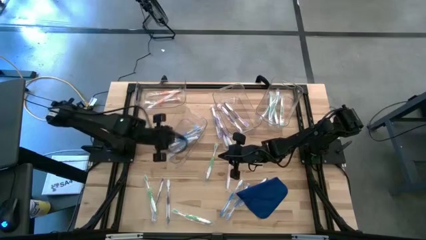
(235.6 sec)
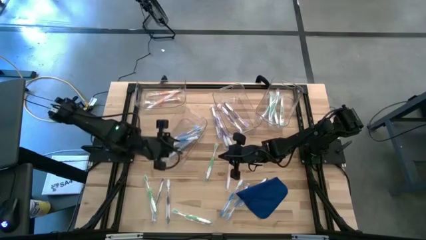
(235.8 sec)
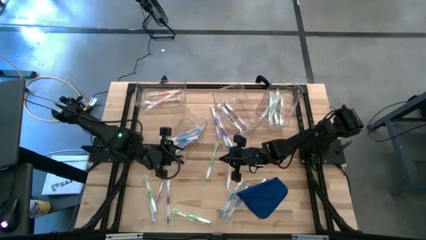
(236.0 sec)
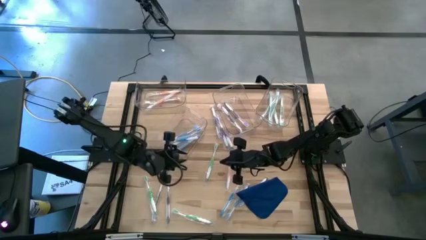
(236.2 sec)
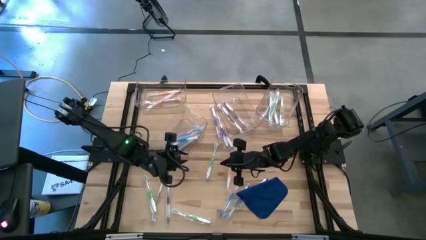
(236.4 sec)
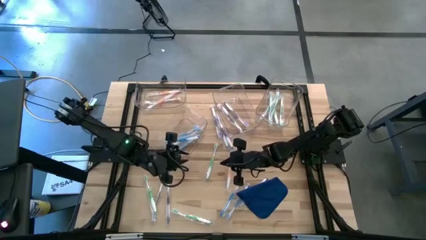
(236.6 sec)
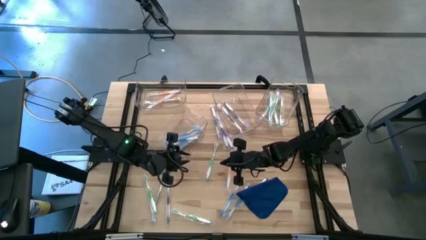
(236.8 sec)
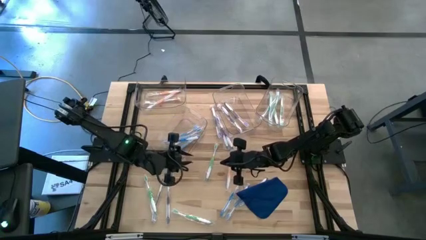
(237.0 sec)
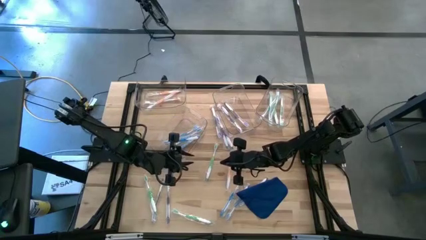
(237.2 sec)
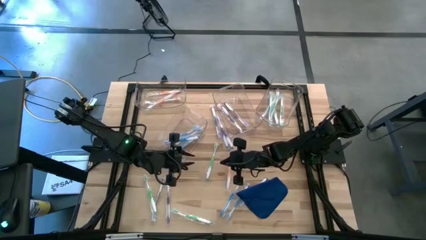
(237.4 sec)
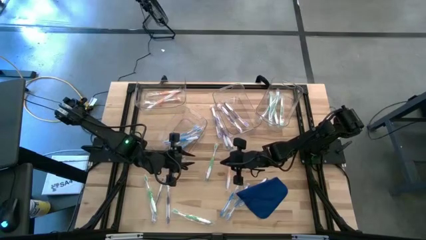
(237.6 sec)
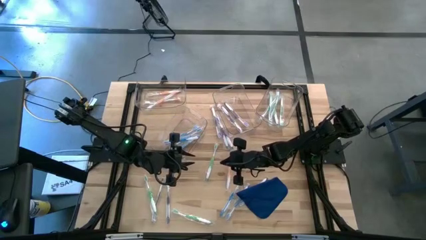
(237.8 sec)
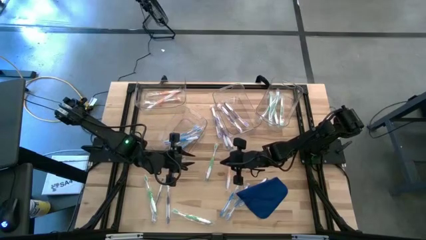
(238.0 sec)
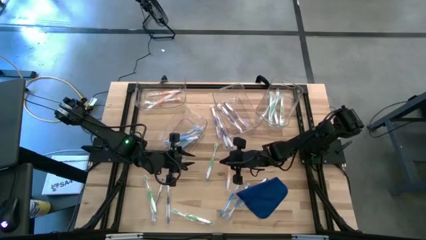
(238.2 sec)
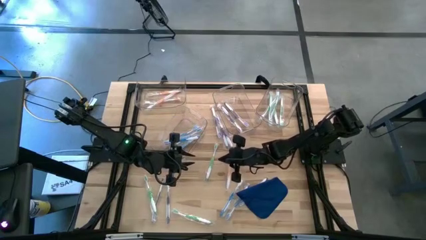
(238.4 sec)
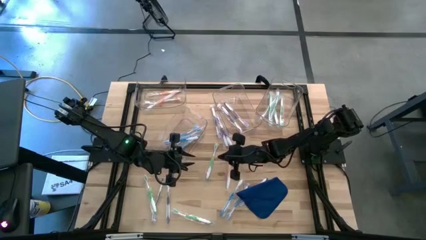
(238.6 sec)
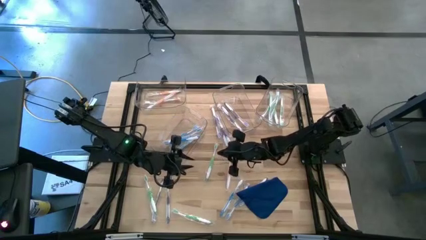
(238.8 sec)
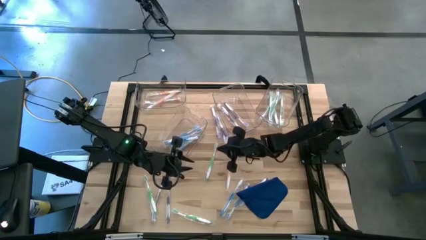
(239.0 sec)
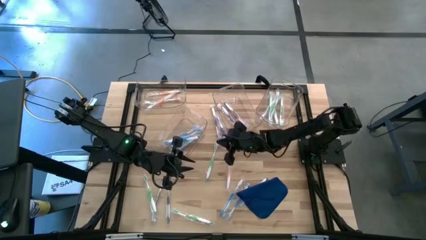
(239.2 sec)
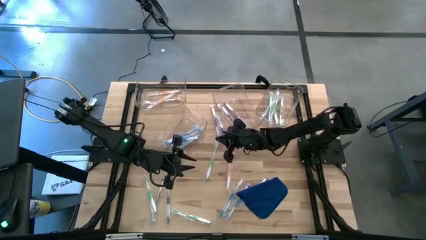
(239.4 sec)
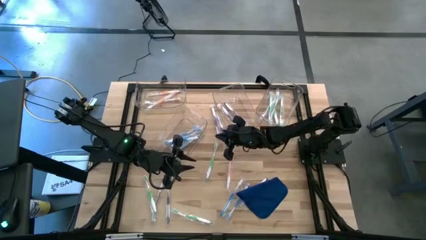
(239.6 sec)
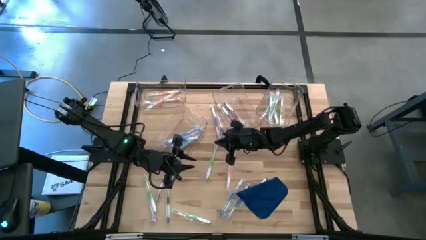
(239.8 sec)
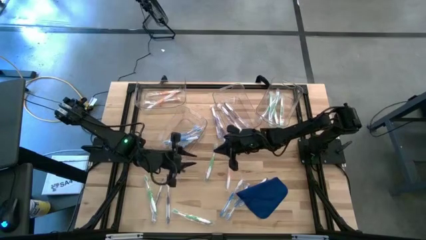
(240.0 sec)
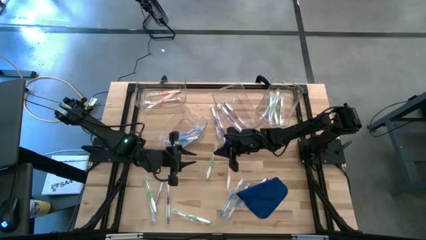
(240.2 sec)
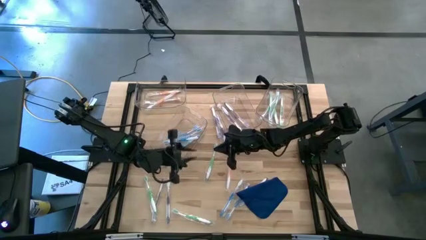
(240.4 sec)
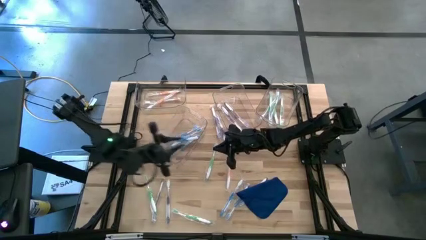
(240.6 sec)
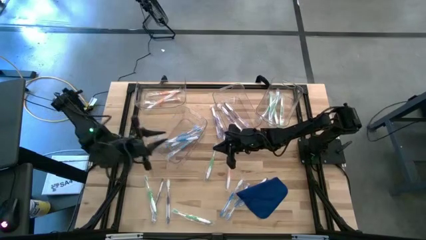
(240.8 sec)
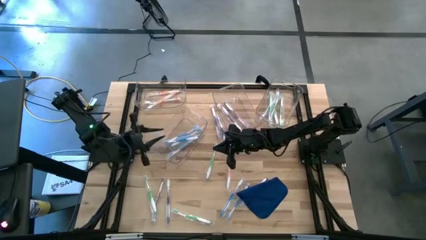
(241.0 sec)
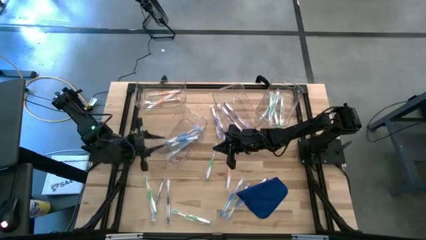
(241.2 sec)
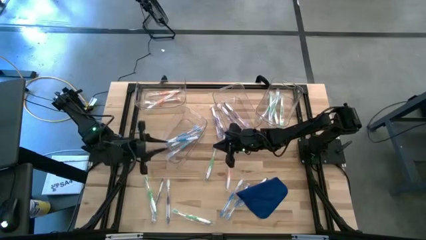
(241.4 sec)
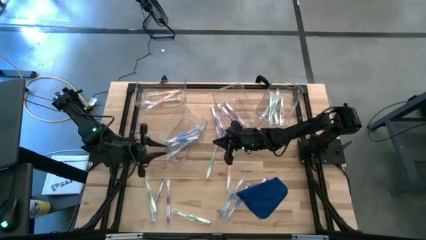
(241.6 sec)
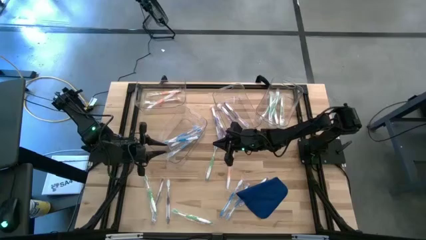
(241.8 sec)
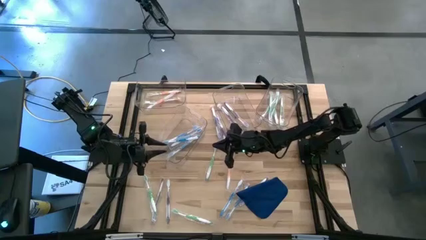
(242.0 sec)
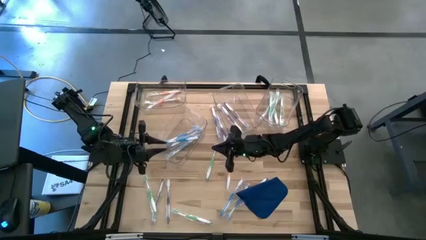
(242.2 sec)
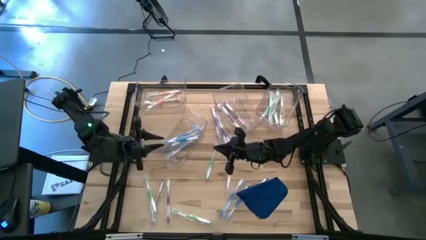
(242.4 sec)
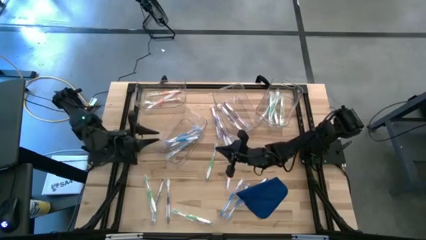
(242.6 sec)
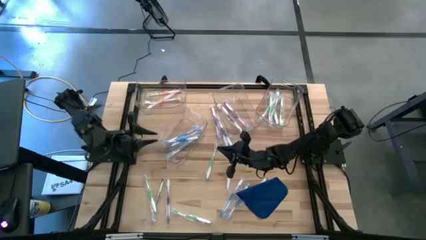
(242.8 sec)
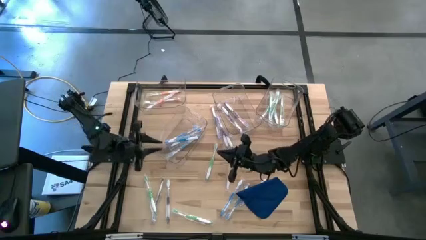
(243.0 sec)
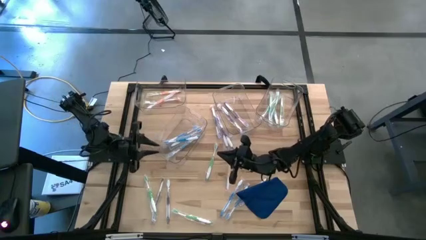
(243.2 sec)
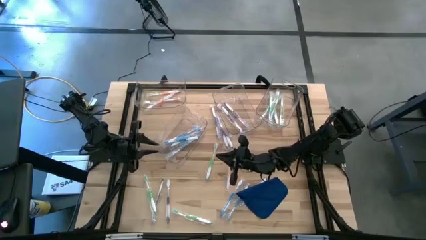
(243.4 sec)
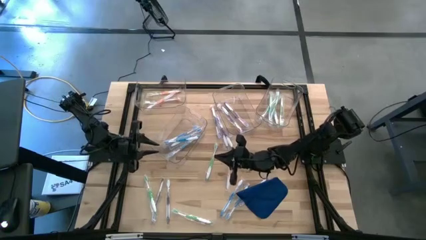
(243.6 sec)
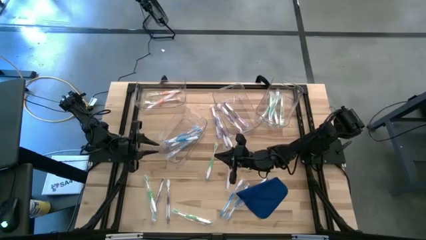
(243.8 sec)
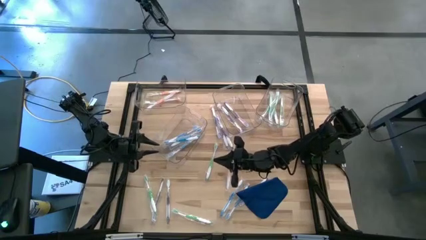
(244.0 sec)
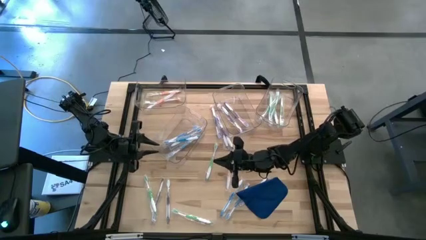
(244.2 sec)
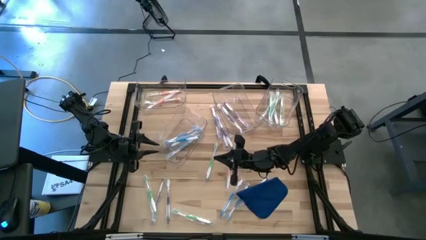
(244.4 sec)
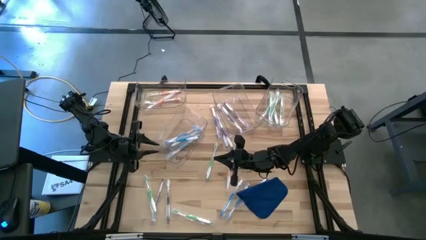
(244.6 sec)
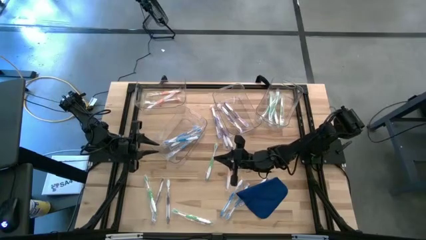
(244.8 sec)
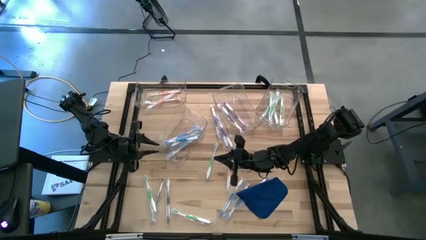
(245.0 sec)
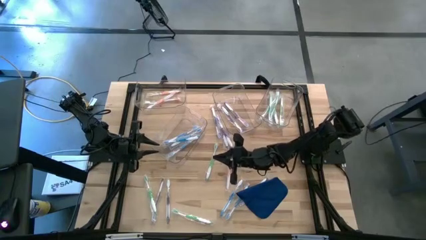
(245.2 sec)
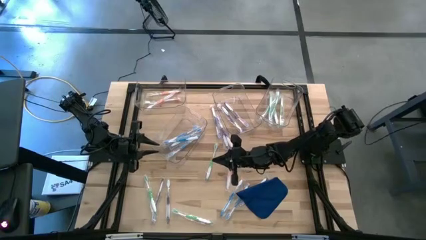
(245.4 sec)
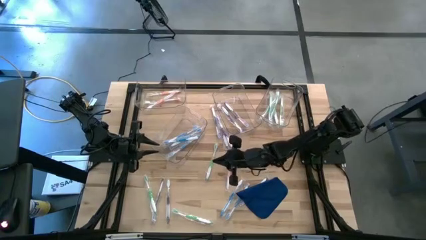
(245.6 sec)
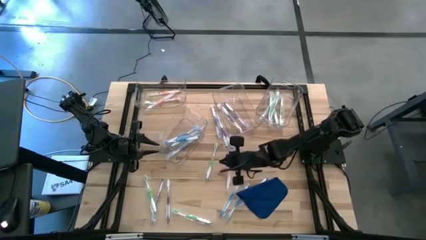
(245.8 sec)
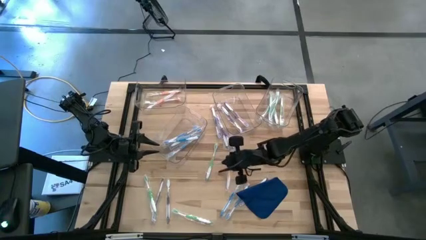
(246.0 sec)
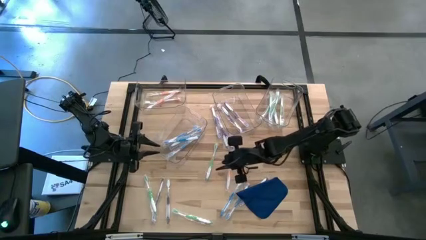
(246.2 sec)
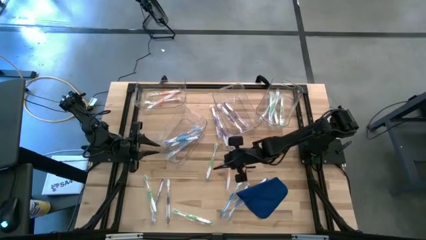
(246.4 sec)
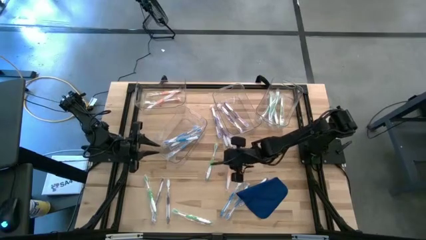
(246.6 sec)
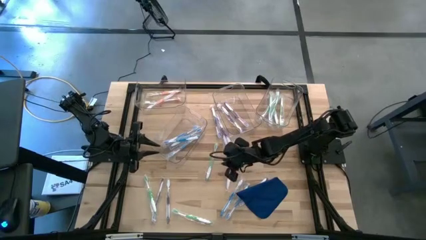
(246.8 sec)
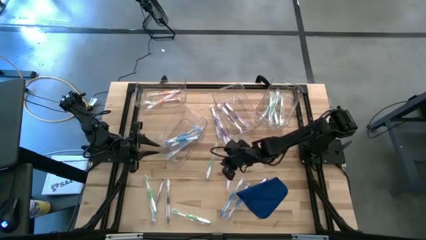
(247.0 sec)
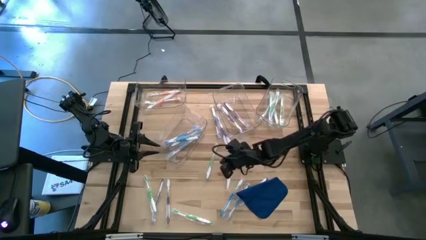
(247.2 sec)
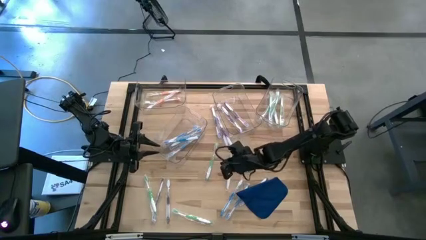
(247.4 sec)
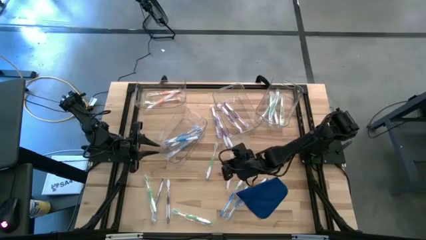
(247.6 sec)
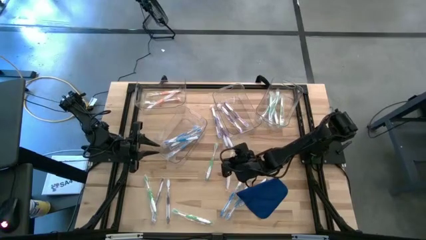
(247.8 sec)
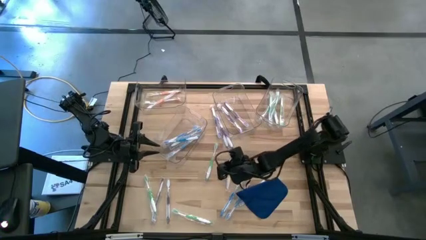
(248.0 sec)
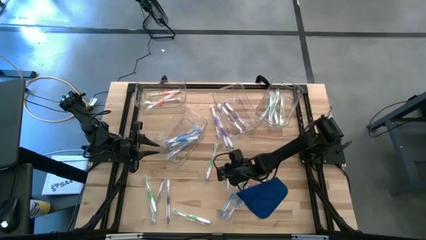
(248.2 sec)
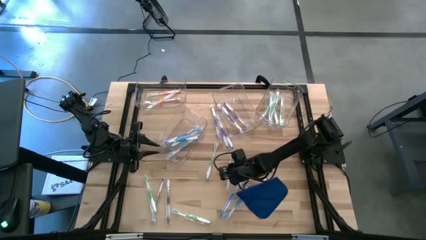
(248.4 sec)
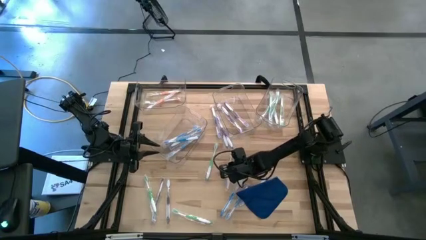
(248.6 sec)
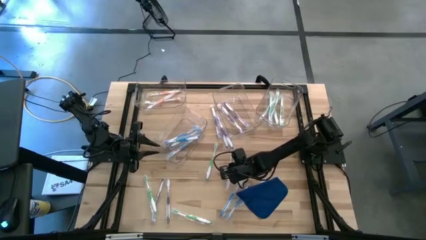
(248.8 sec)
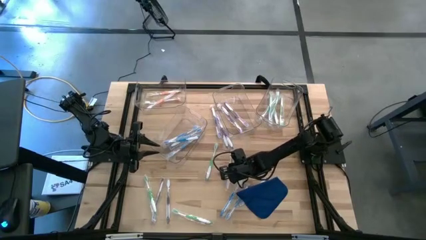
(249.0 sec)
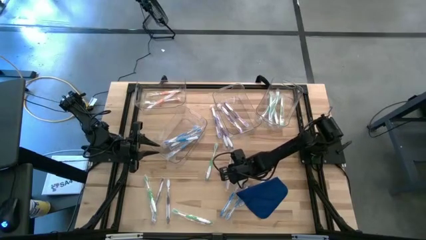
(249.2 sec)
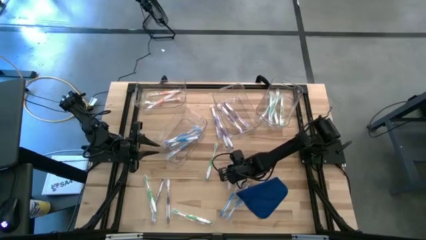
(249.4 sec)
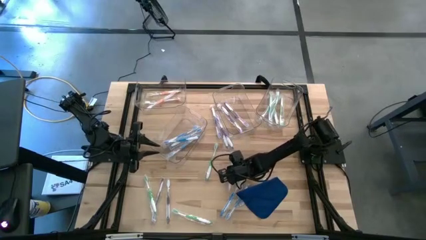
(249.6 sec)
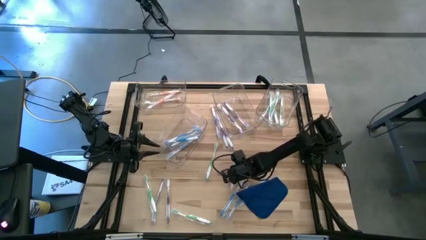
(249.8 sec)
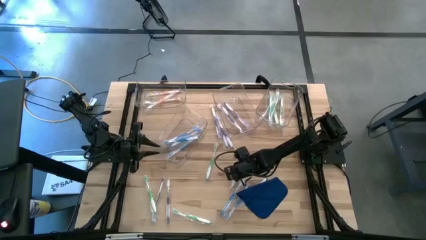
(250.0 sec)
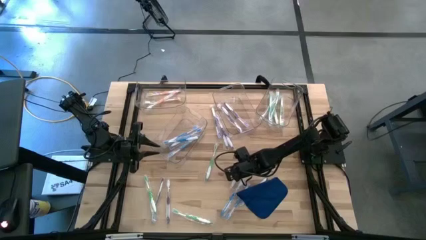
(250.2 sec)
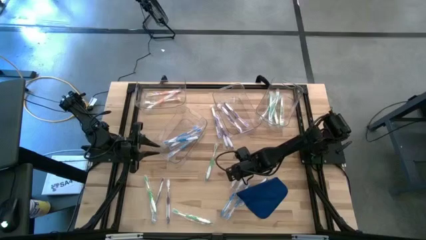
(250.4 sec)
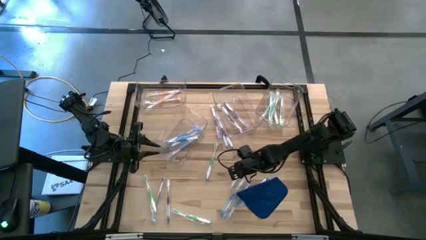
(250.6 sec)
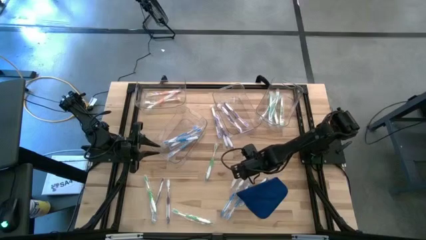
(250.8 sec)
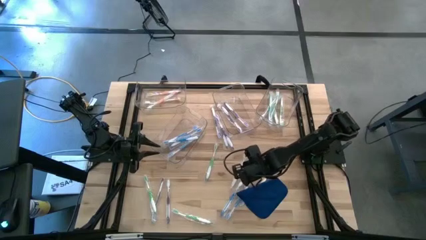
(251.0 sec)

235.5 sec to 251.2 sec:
Task: Pick & Place Toothbrushes
Put the orange toothbrush into the top left transparent bin
